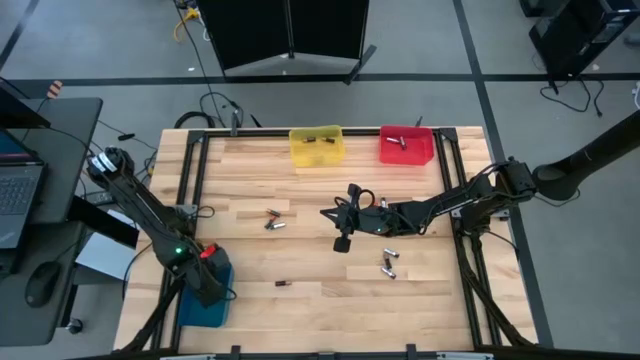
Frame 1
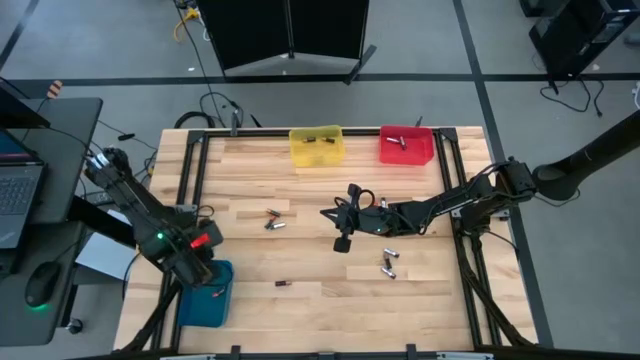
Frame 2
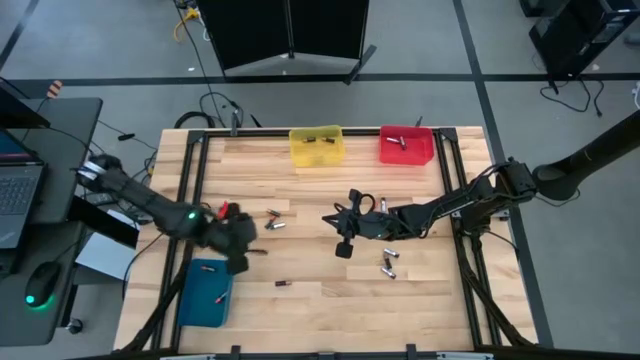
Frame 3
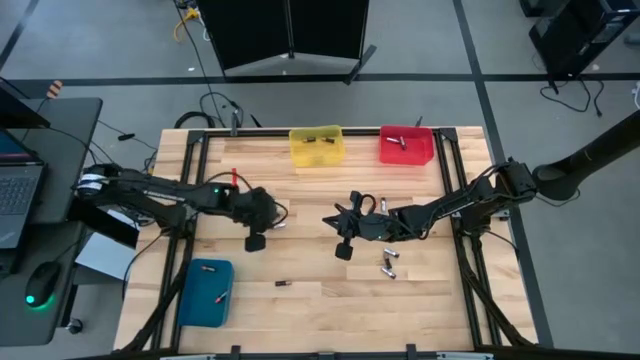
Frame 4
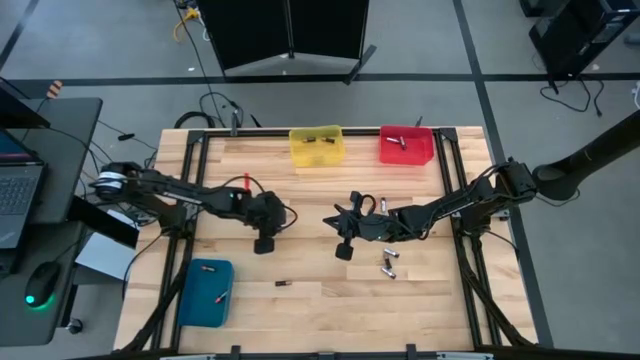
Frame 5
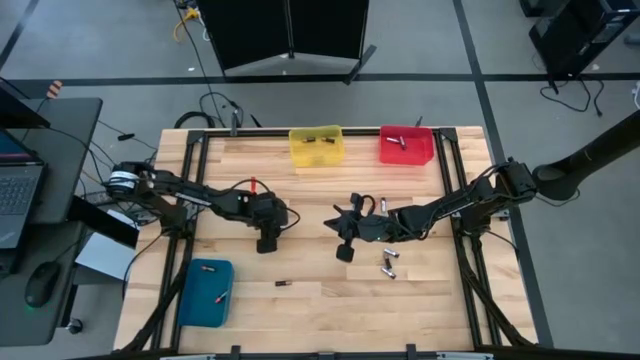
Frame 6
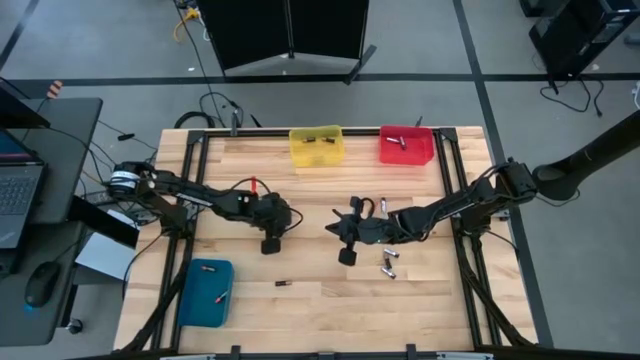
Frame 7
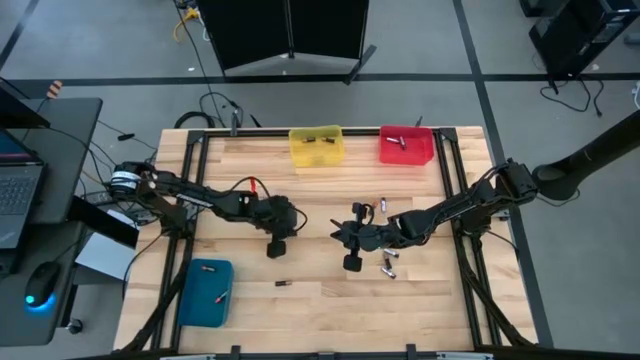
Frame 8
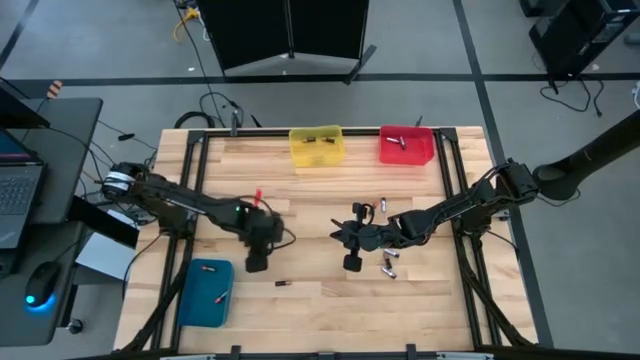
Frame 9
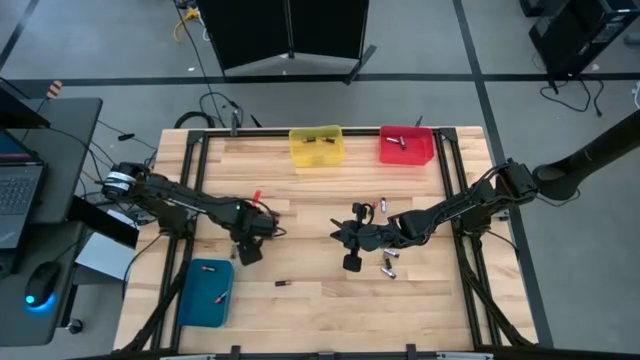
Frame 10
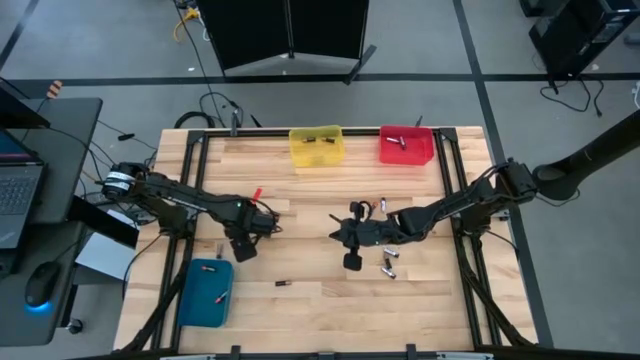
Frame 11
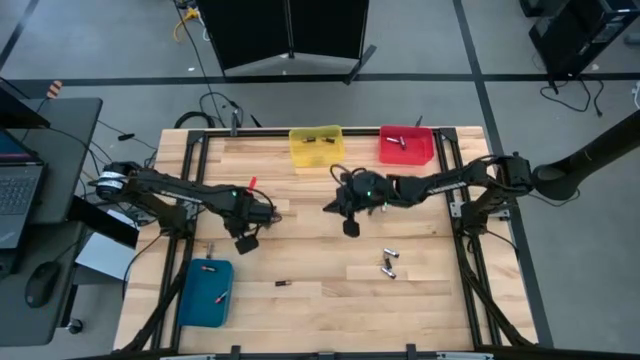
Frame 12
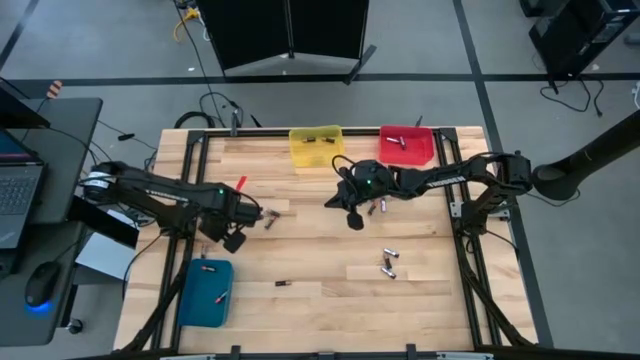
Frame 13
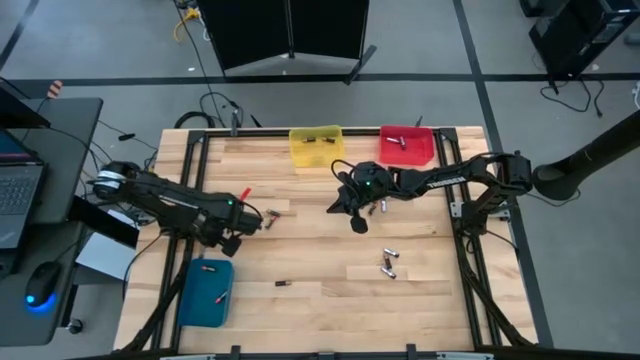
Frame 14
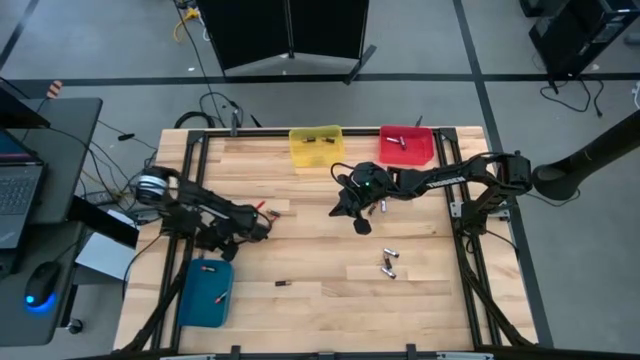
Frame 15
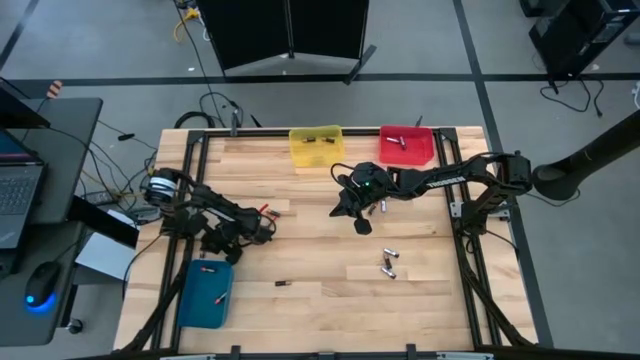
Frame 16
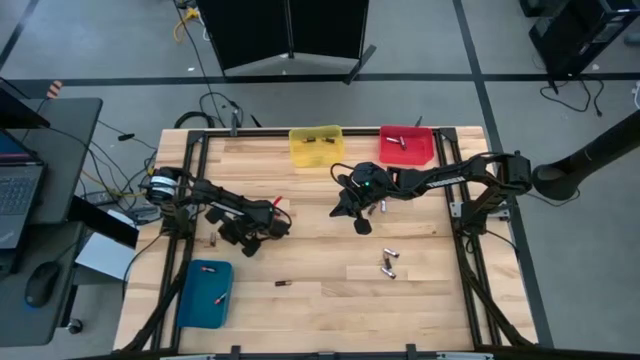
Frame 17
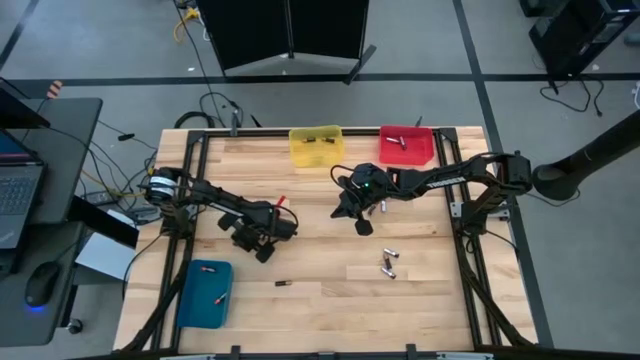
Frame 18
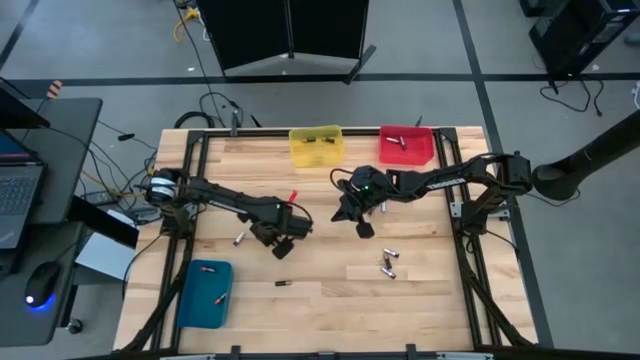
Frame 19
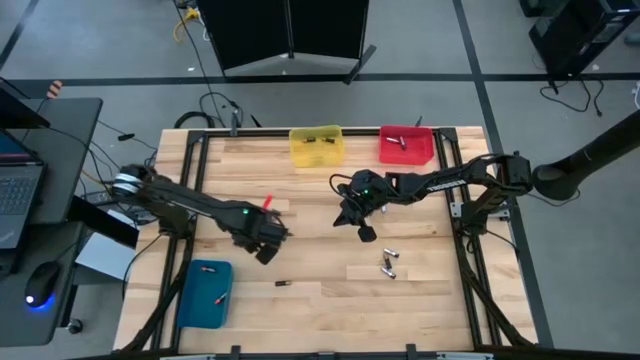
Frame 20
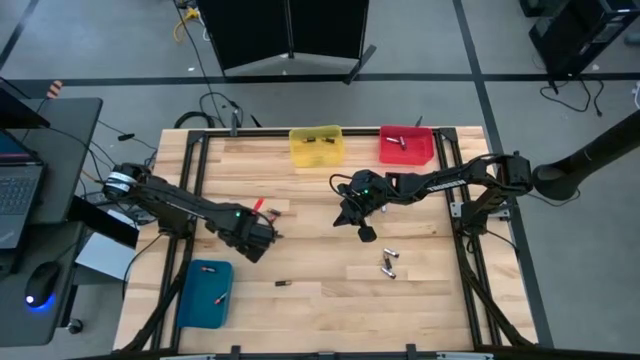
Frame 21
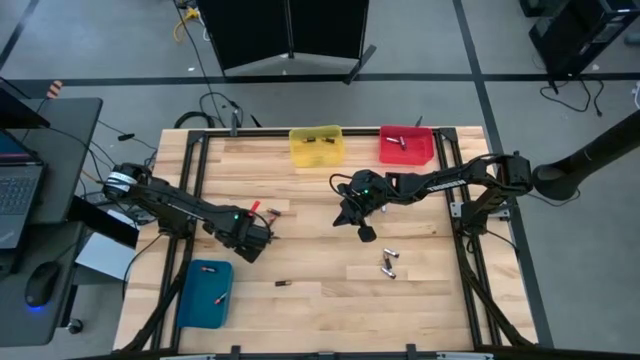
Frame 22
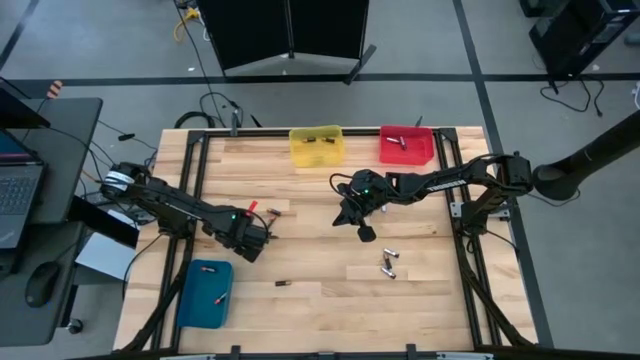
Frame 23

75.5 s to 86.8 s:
Task: Sort batteries
Put the silver battery into the red bin

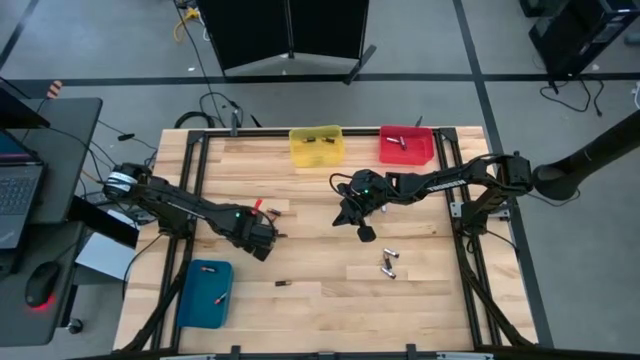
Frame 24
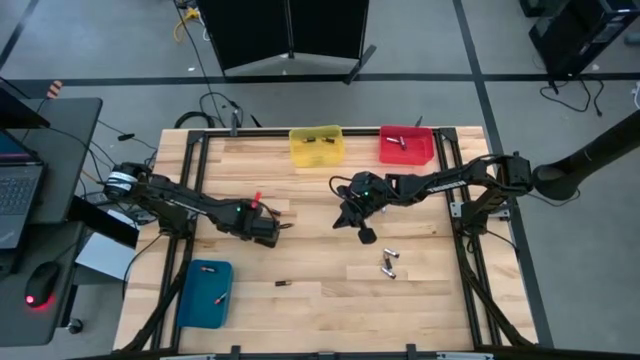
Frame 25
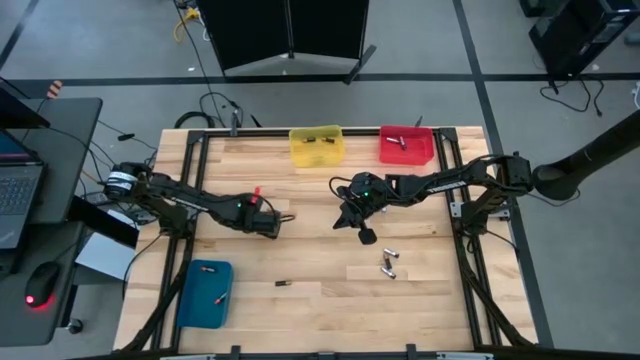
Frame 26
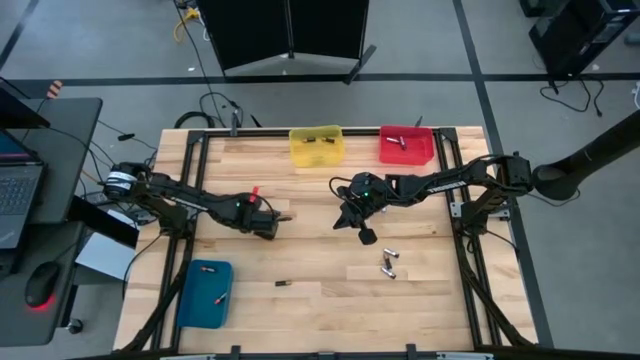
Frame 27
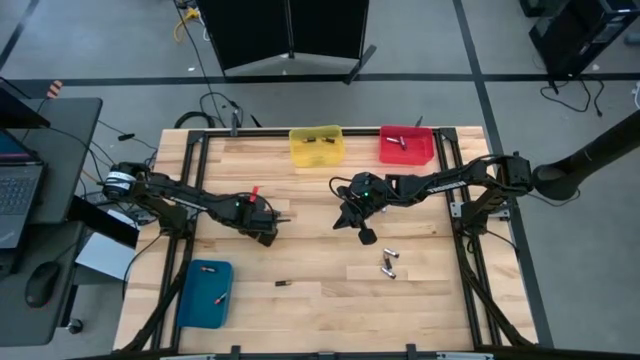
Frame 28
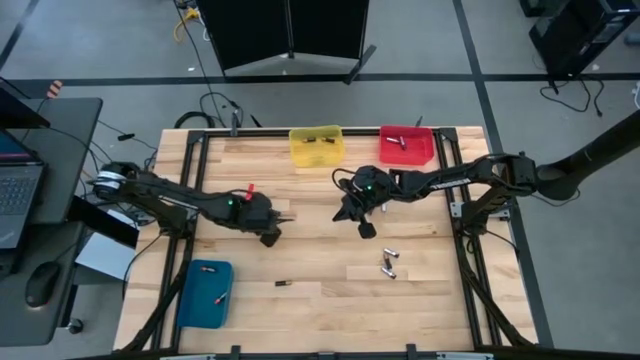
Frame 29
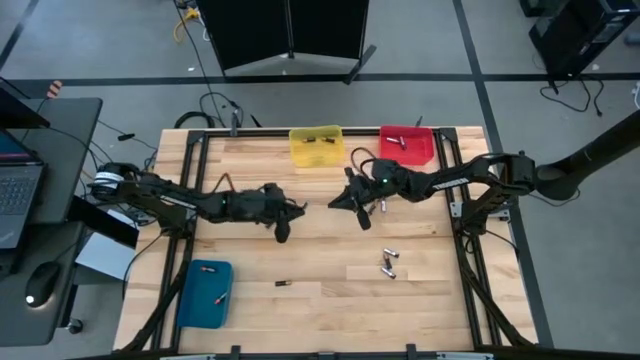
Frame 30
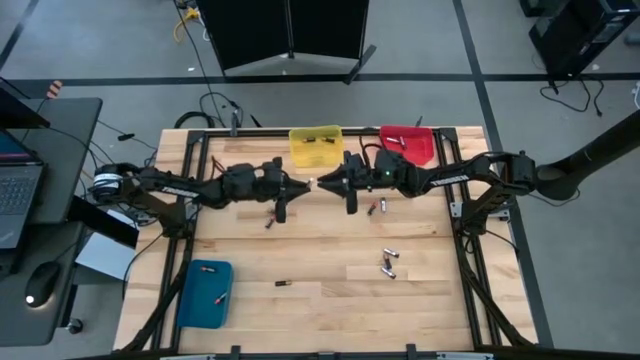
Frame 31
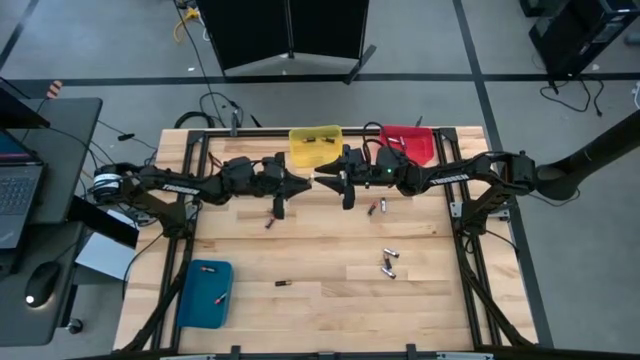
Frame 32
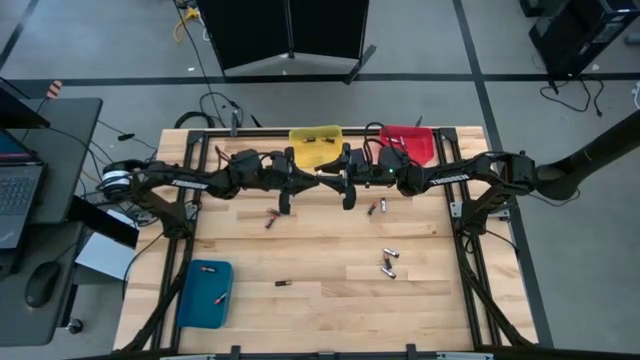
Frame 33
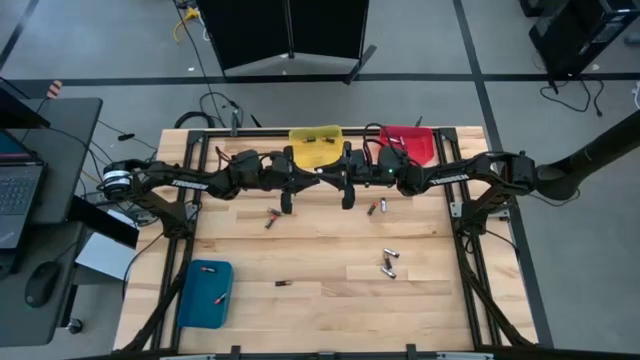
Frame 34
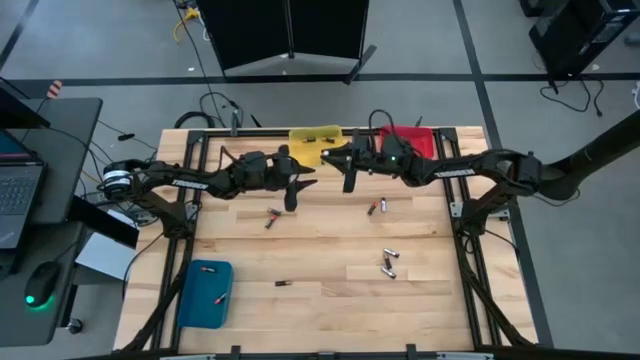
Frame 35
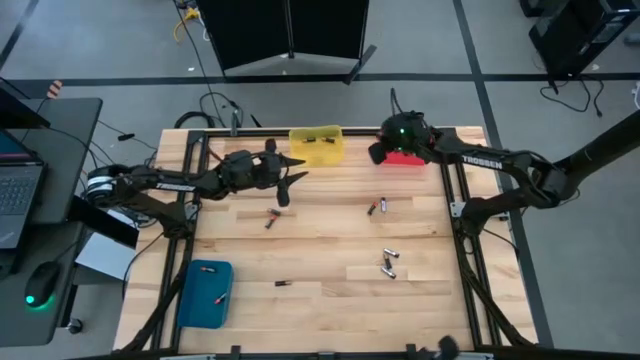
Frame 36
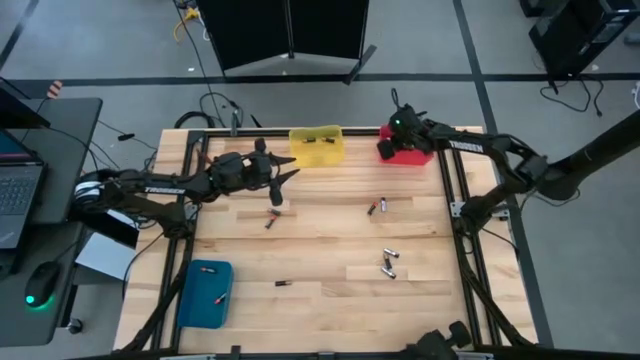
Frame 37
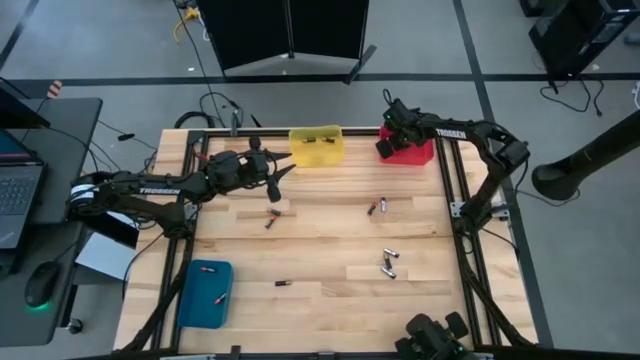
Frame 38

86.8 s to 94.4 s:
Put the silver battery into the red bin

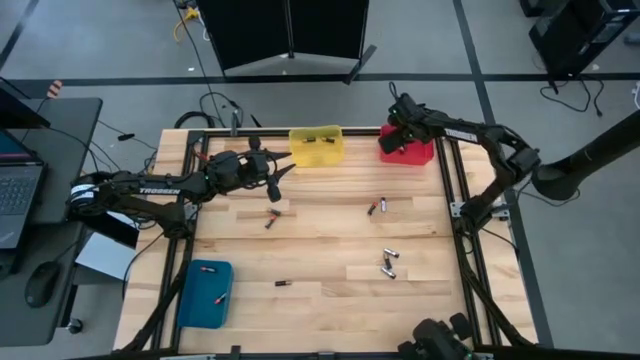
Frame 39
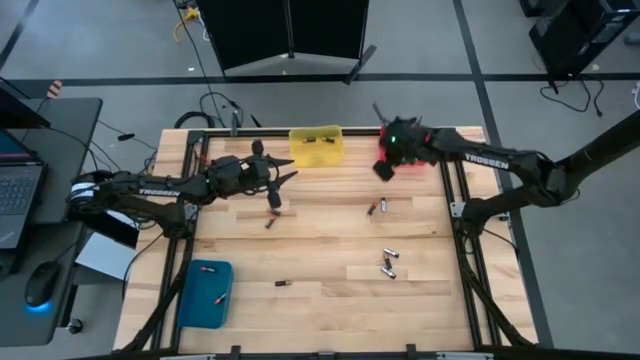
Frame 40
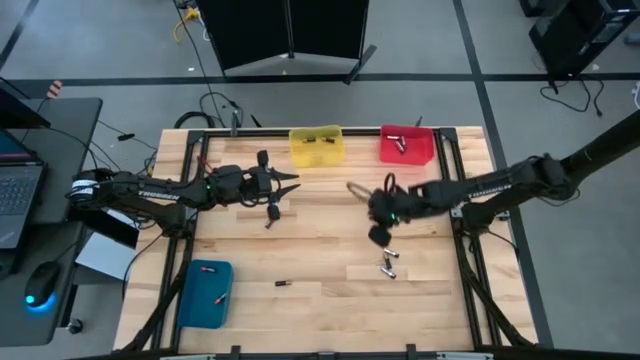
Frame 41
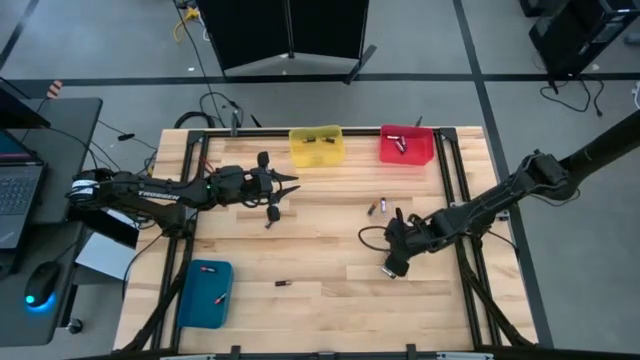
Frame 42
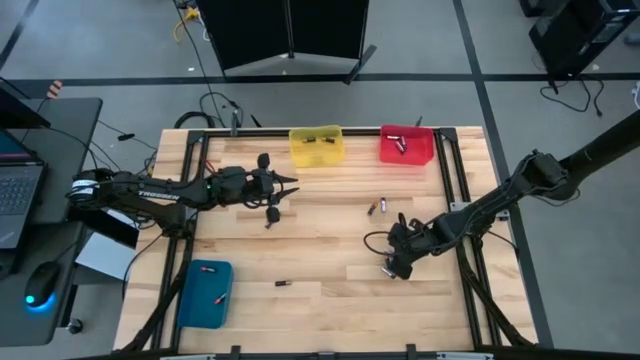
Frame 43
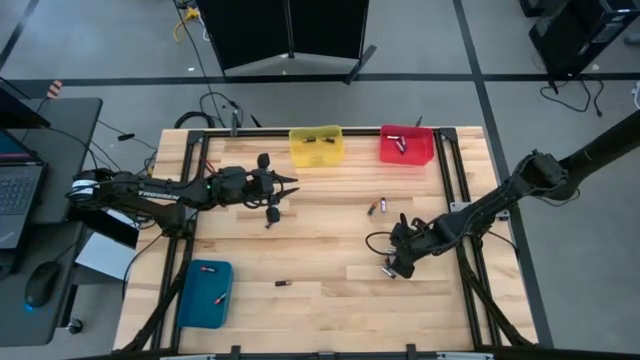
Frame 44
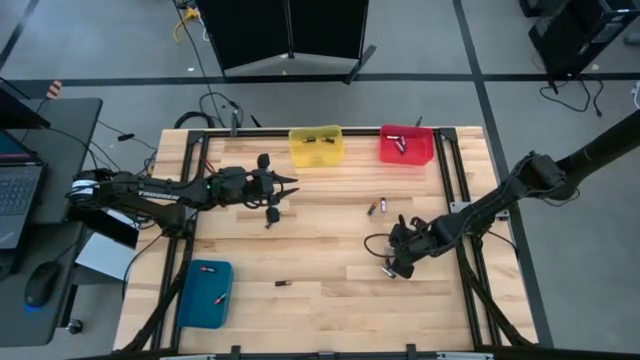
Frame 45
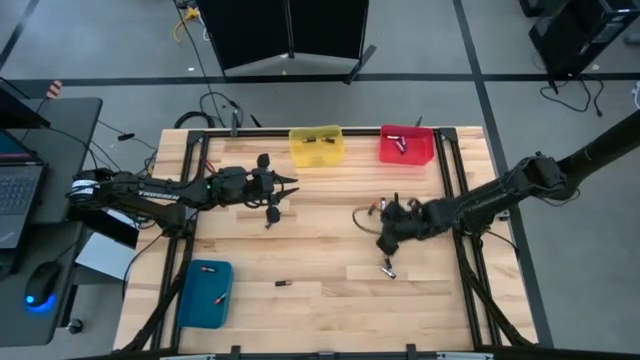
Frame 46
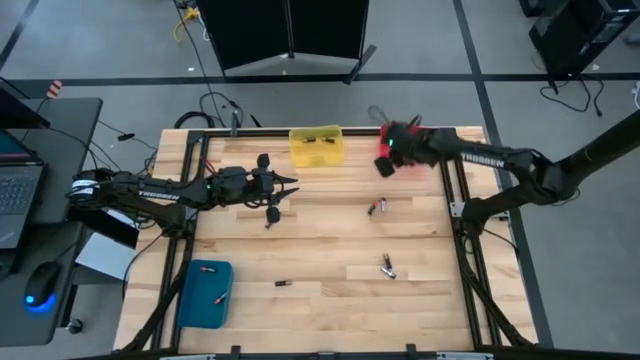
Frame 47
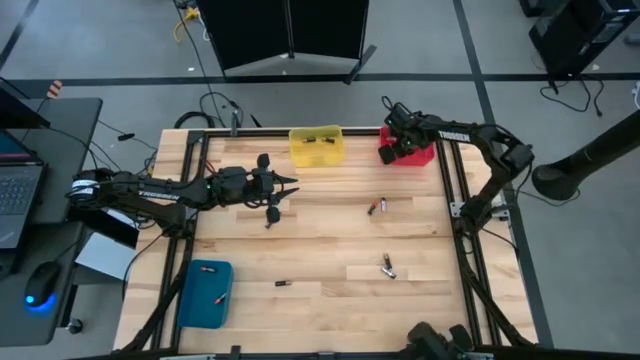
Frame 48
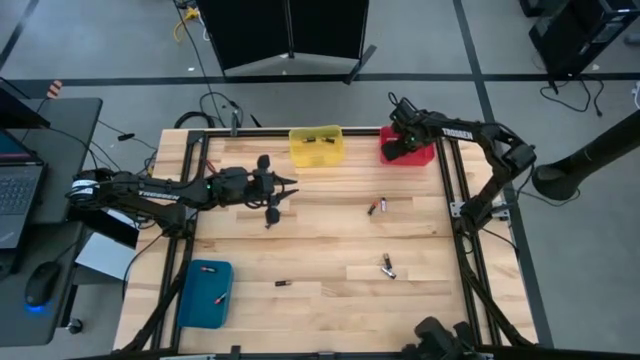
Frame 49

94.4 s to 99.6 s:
Put the silver battery into the red bin
